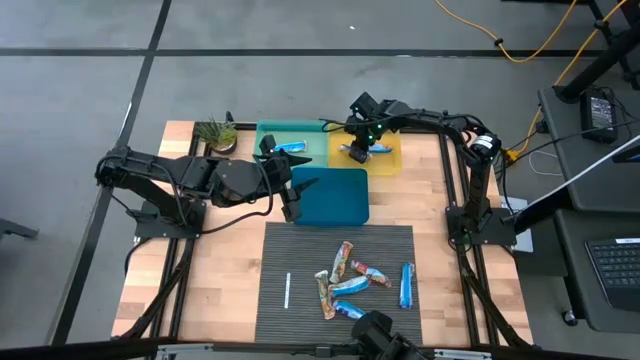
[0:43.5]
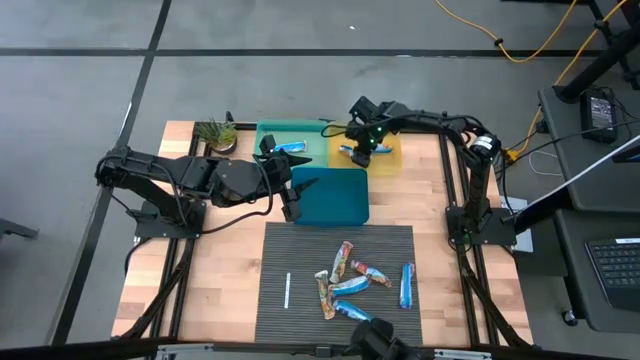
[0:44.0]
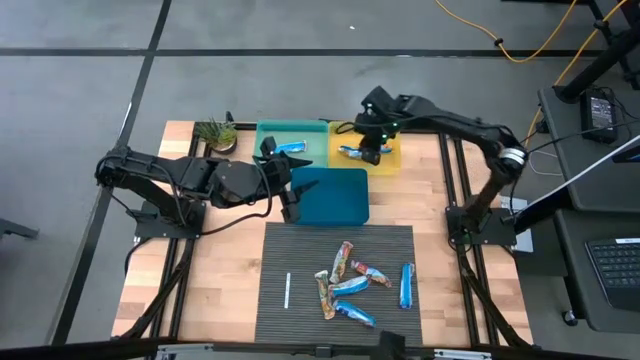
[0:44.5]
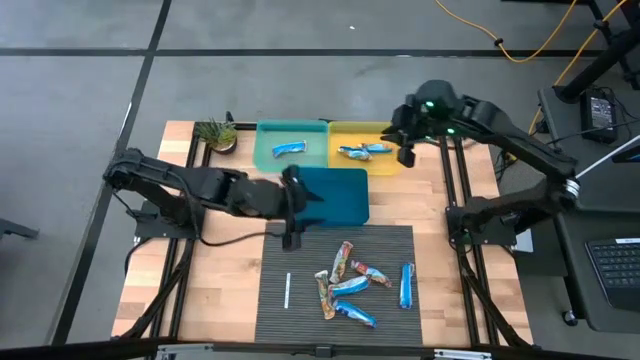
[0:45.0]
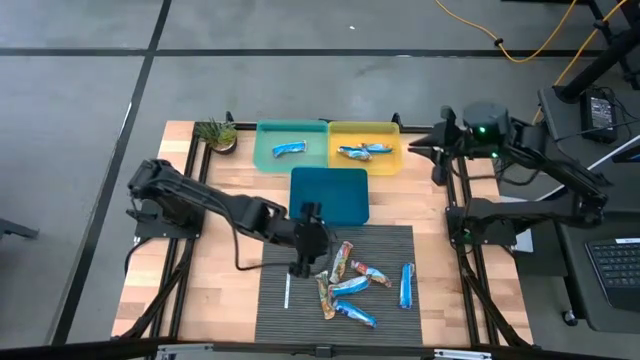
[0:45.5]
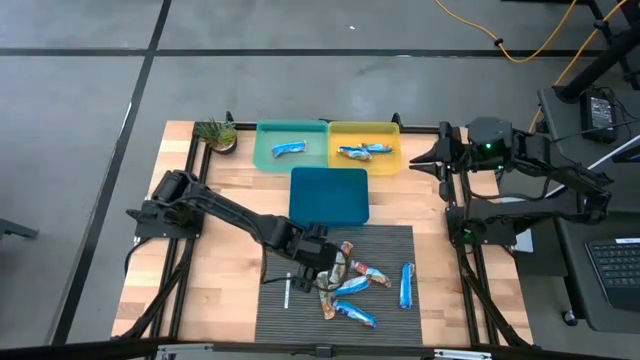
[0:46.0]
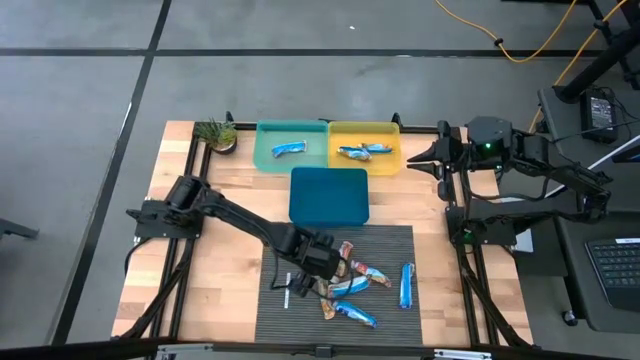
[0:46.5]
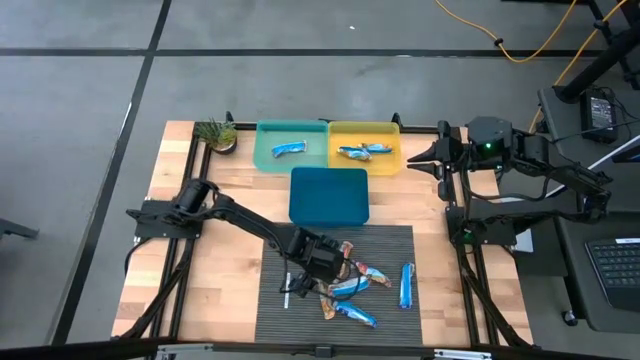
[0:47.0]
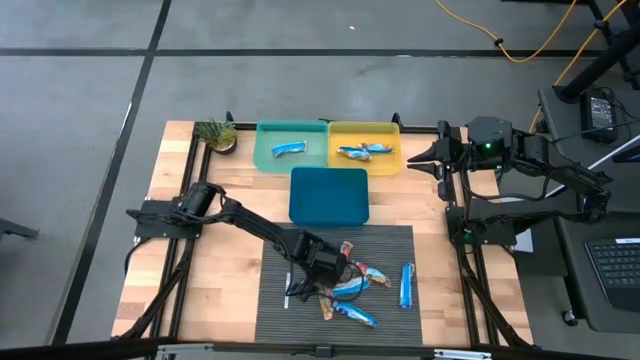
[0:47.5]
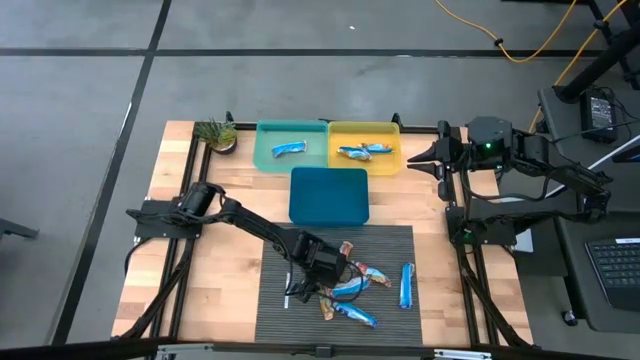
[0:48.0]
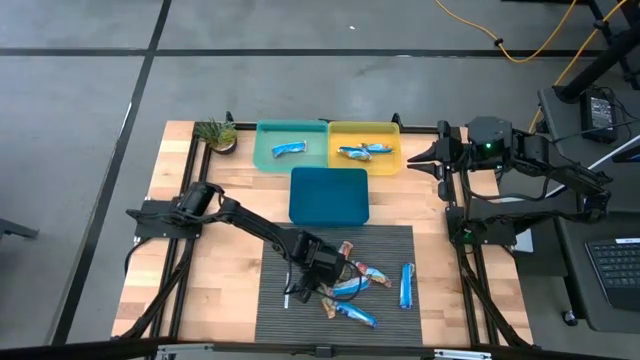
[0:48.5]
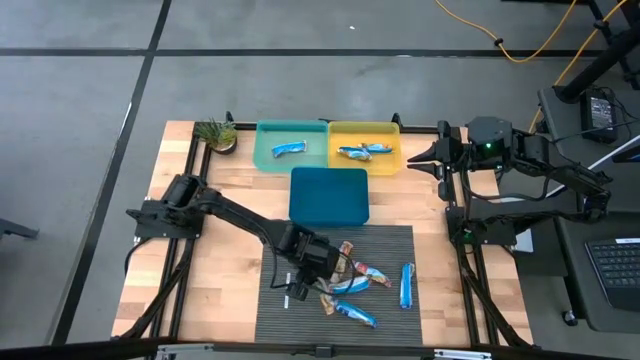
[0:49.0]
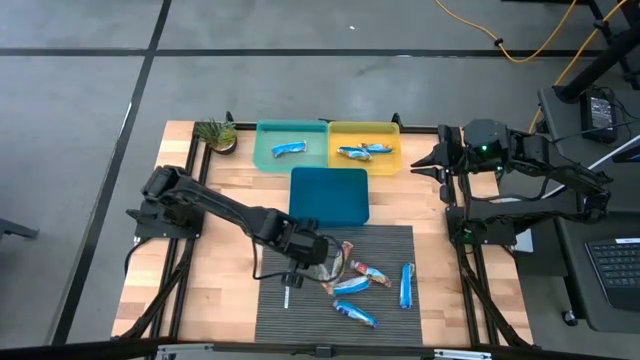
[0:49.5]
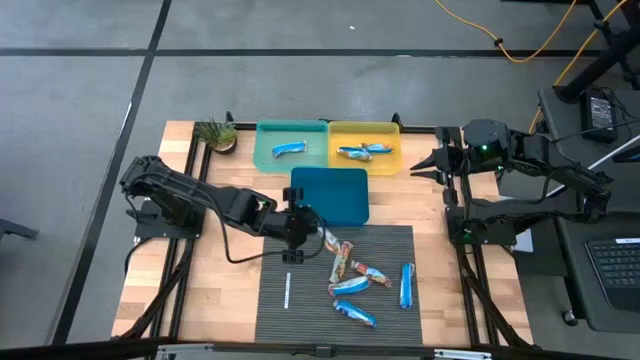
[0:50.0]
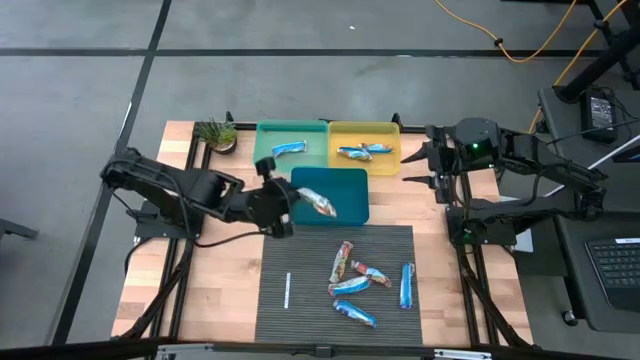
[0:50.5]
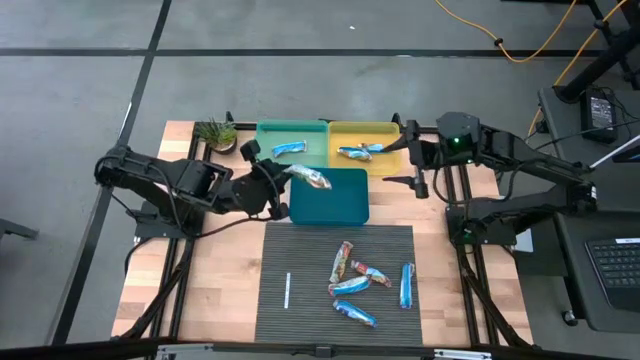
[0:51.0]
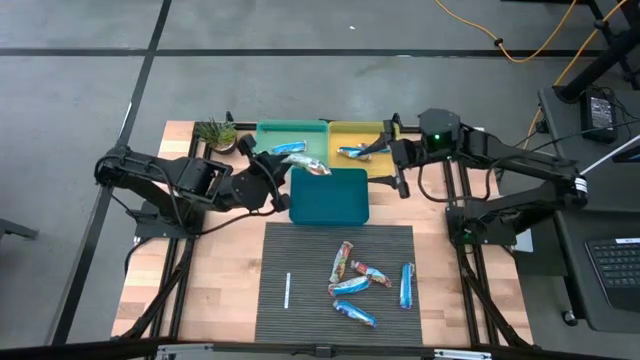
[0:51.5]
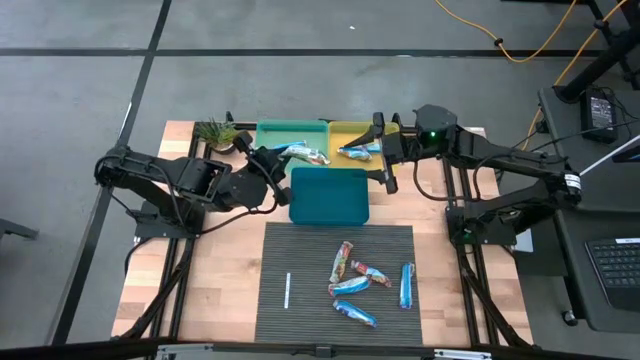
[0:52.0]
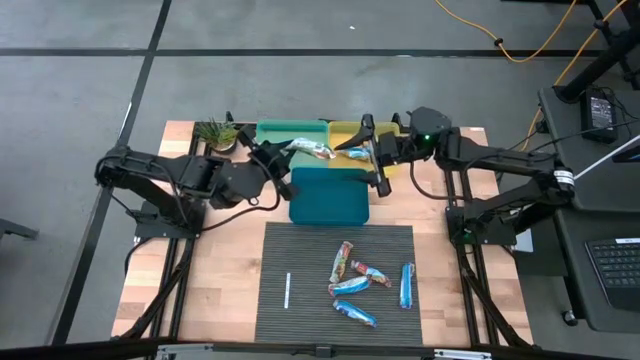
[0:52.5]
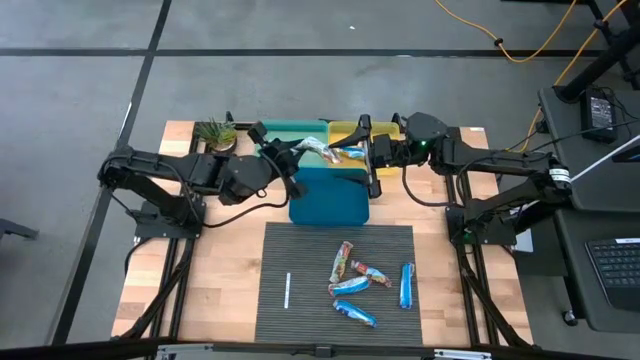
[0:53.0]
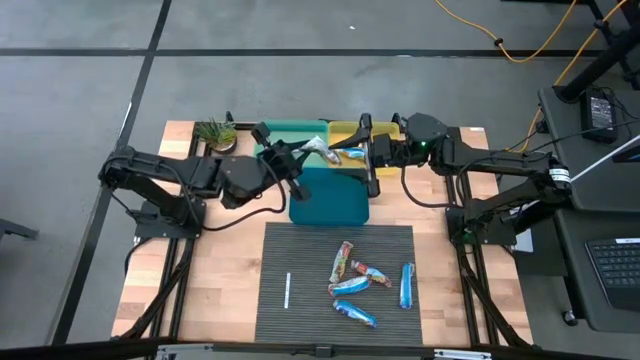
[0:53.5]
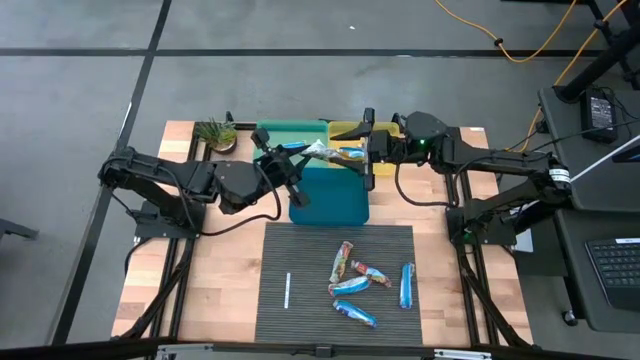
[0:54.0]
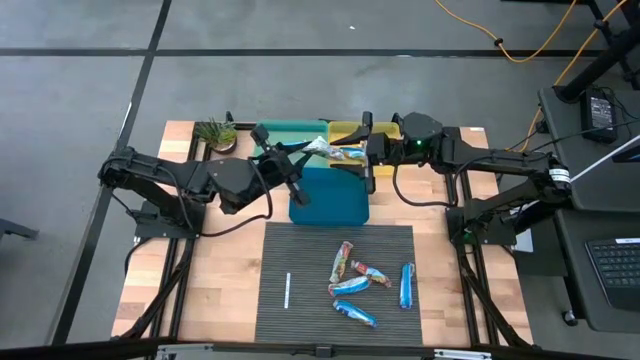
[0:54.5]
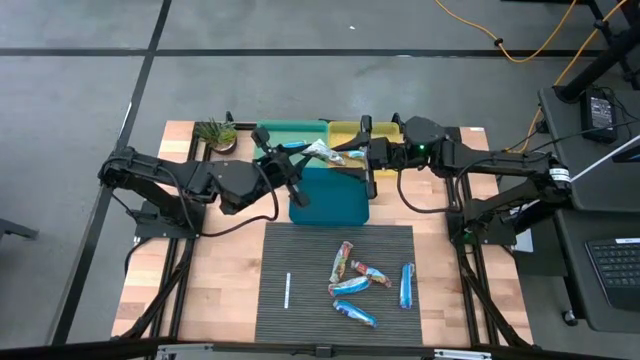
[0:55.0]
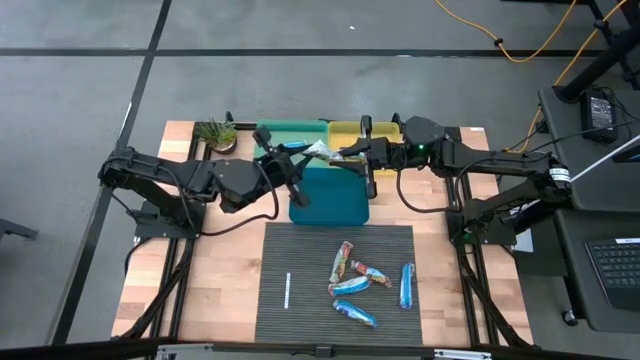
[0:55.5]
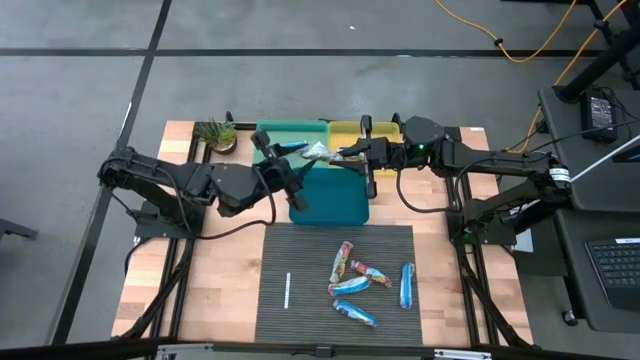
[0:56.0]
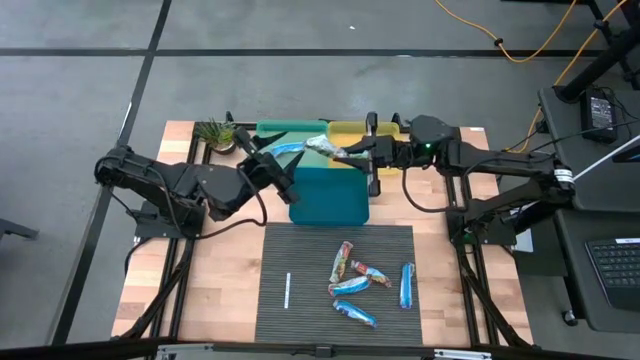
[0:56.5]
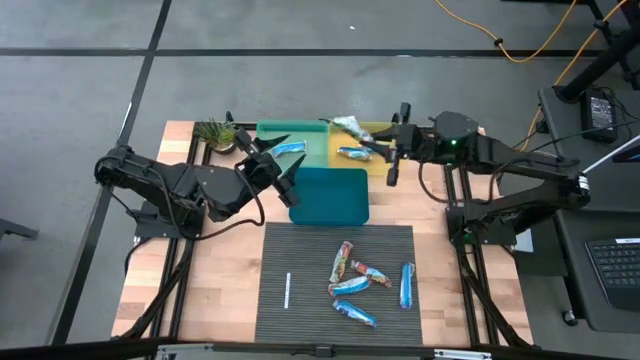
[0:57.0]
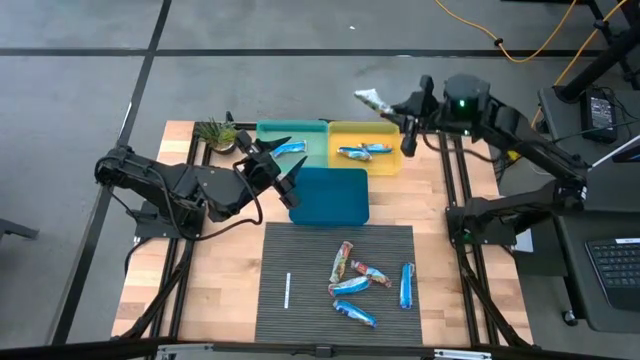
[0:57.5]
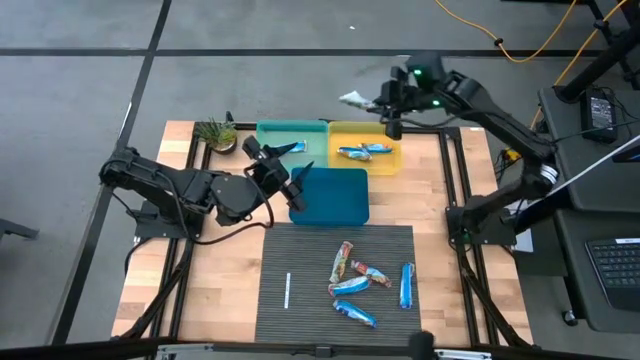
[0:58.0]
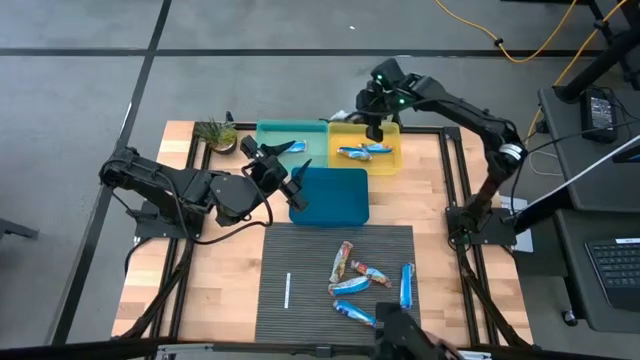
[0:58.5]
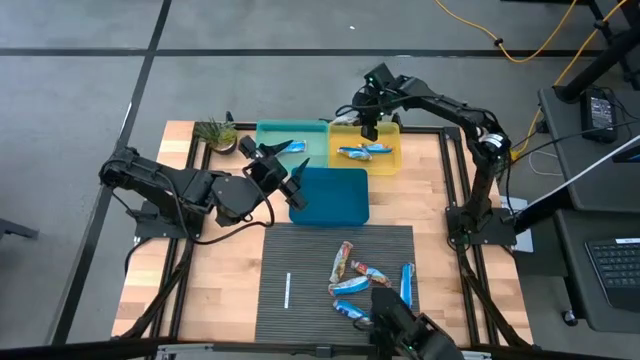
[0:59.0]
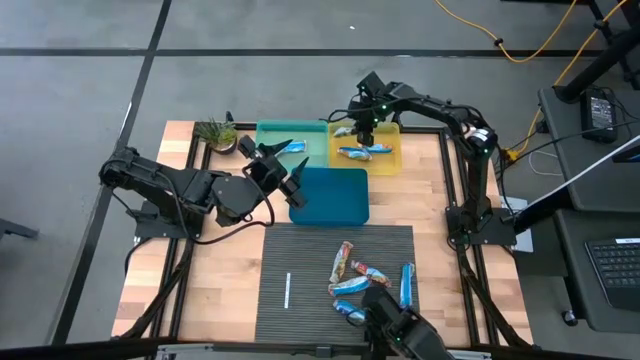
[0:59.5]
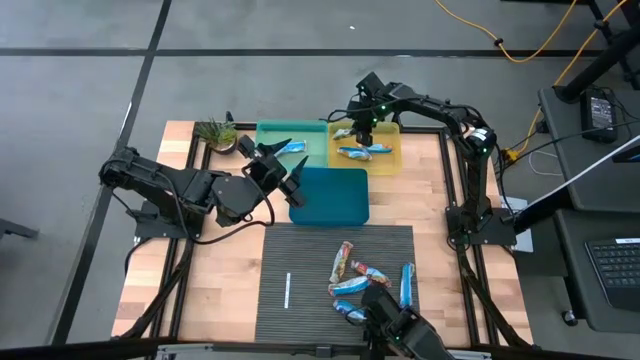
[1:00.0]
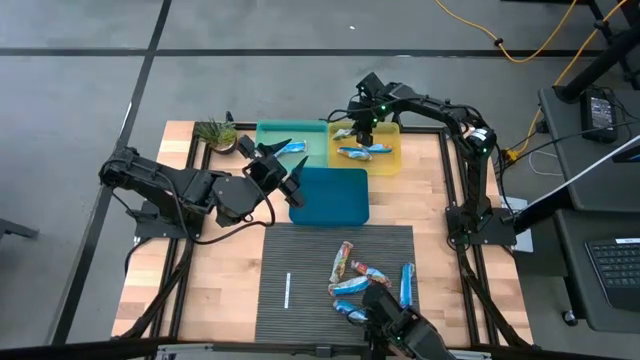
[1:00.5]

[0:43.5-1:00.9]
Task: Pick and place Granola Bars by type
Put the yellow granola bar into the yellow bin

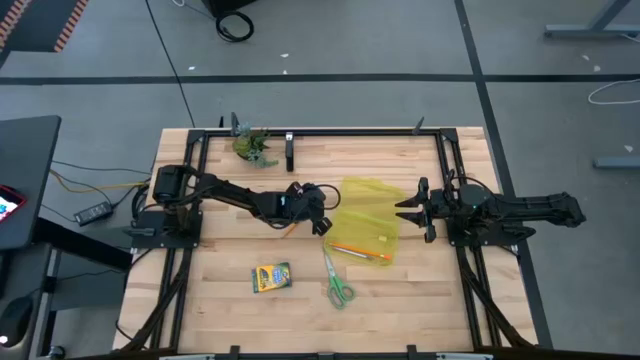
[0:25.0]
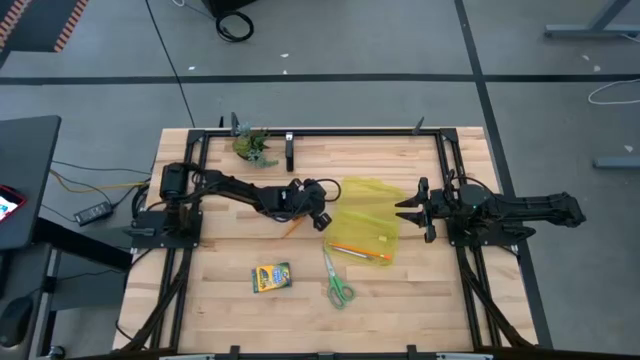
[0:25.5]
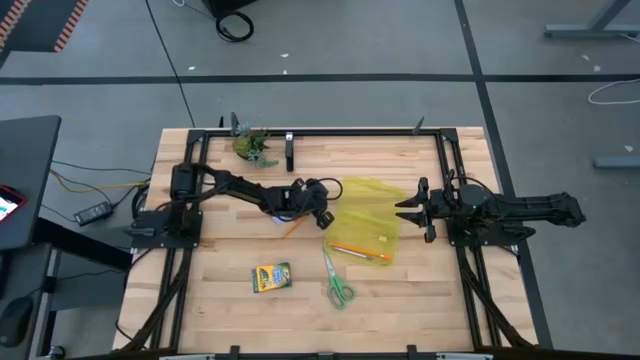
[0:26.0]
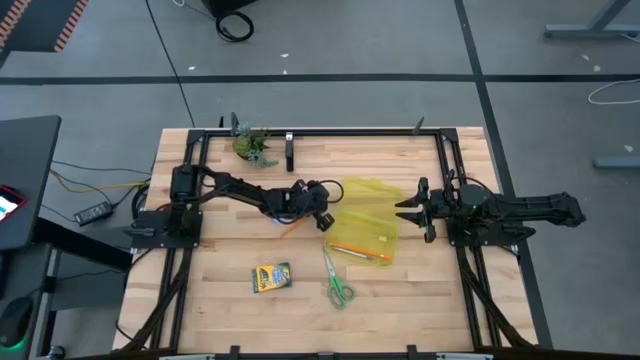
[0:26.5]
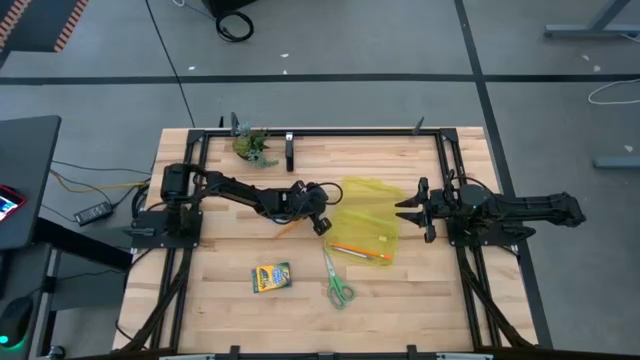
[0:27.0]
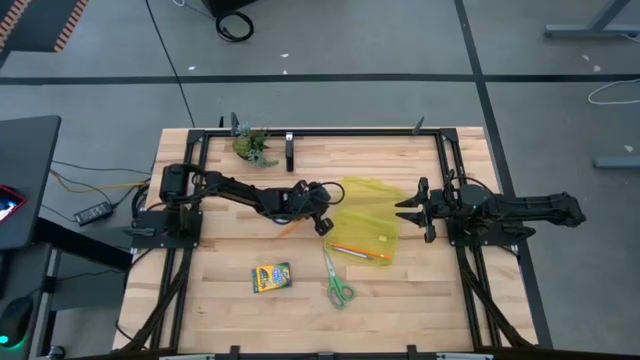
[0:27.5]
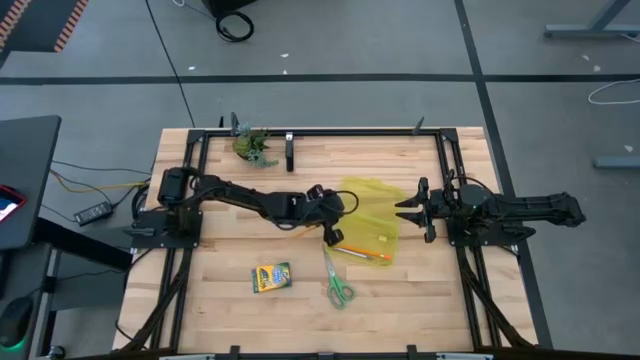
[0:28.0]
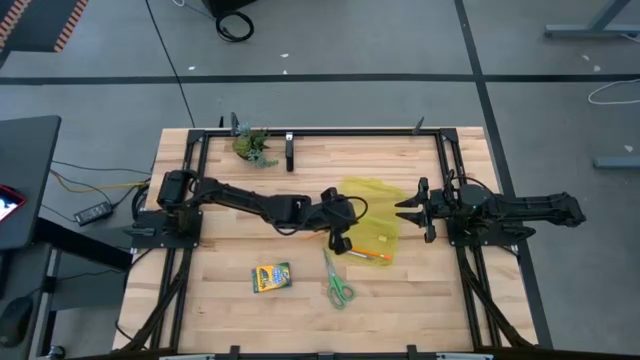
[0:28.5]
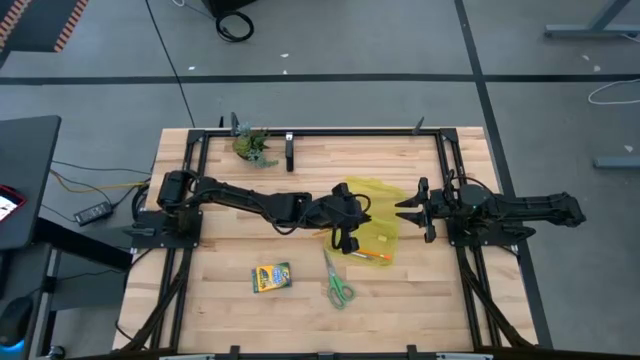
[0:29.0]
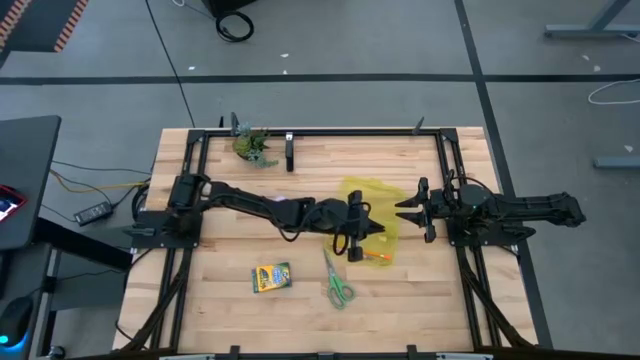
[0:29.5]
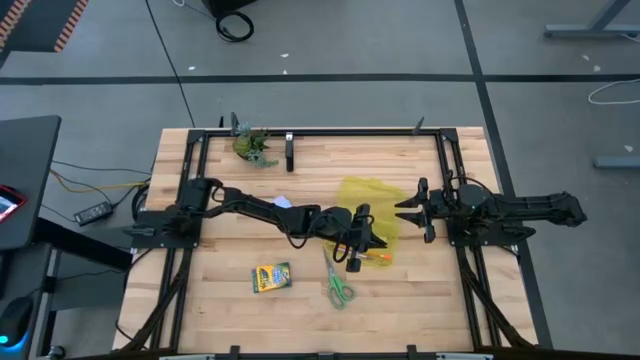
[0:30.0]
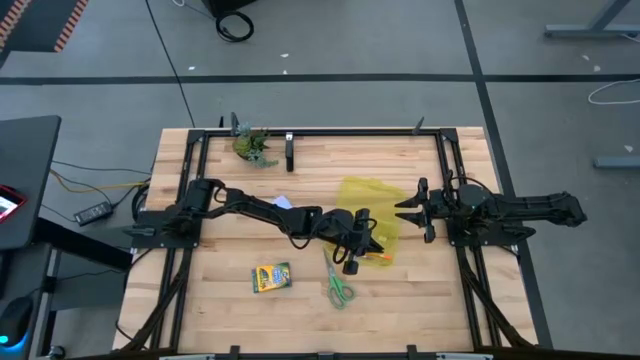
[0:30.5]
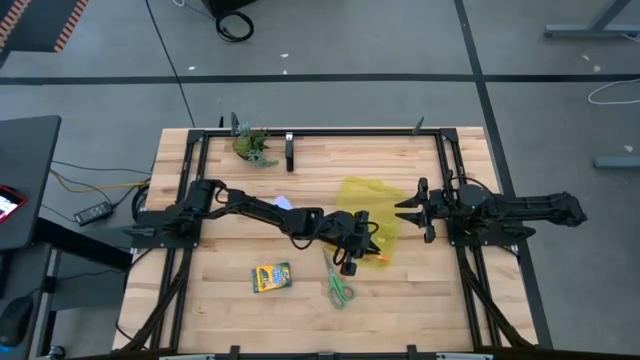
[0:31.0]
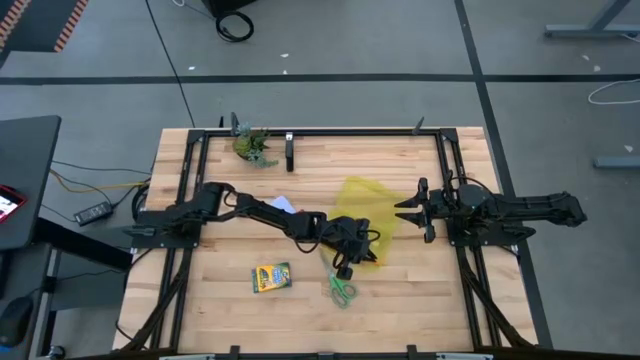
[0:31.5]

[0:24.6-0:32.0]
Task: Pack school essentials
Put the orange pencil into the yellow supply box
